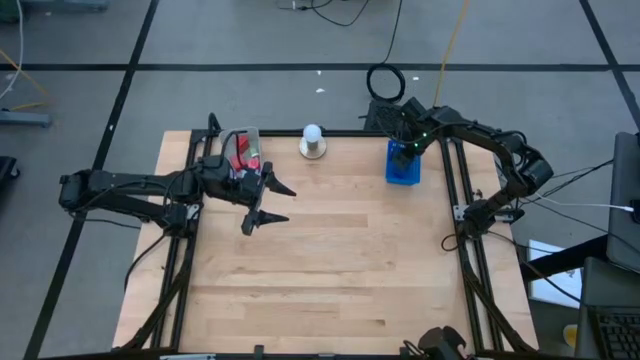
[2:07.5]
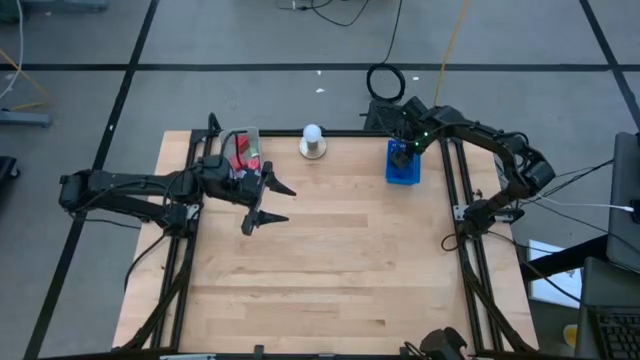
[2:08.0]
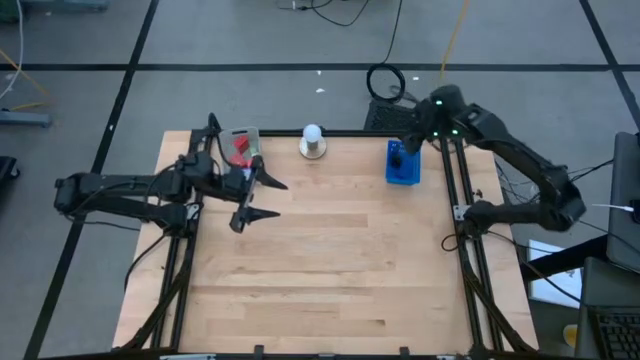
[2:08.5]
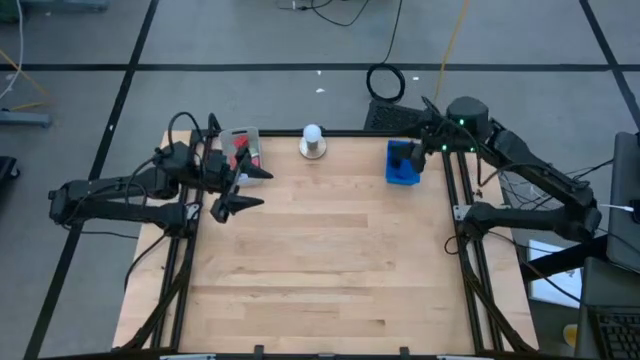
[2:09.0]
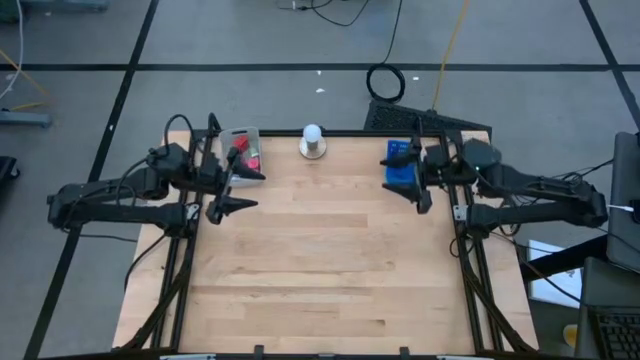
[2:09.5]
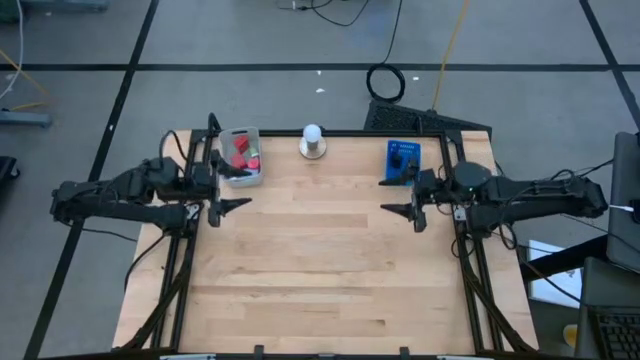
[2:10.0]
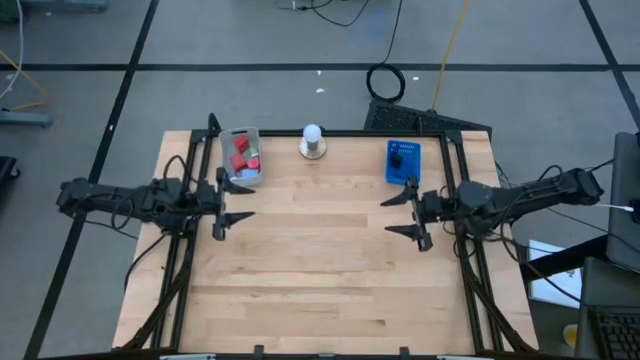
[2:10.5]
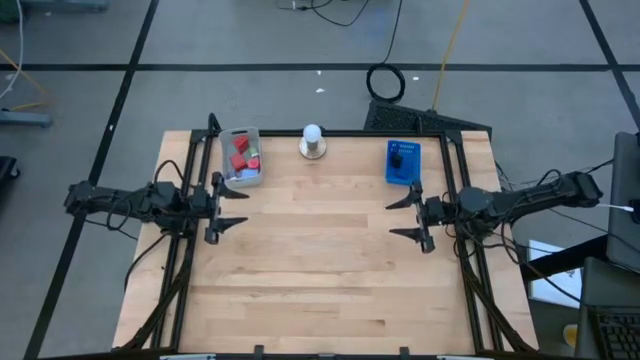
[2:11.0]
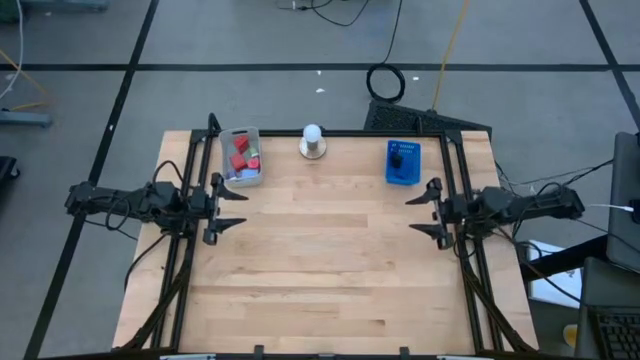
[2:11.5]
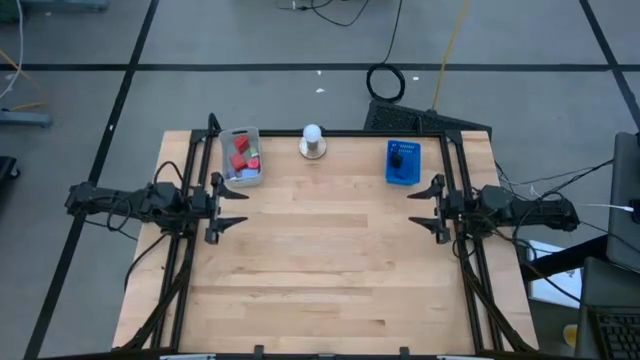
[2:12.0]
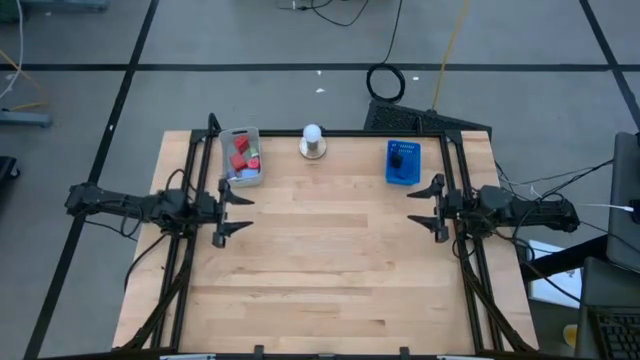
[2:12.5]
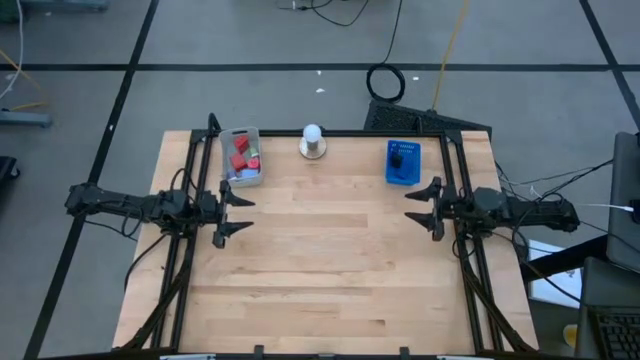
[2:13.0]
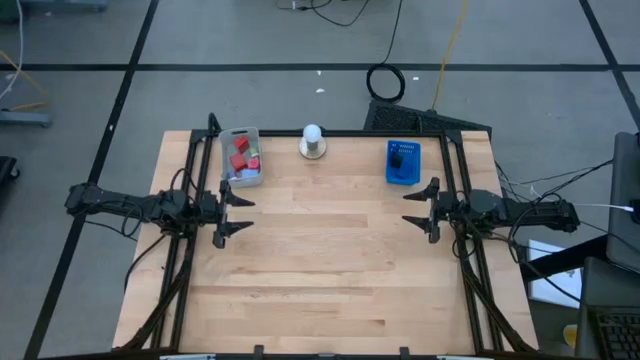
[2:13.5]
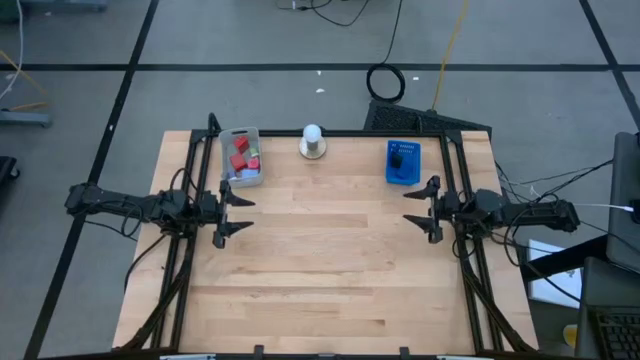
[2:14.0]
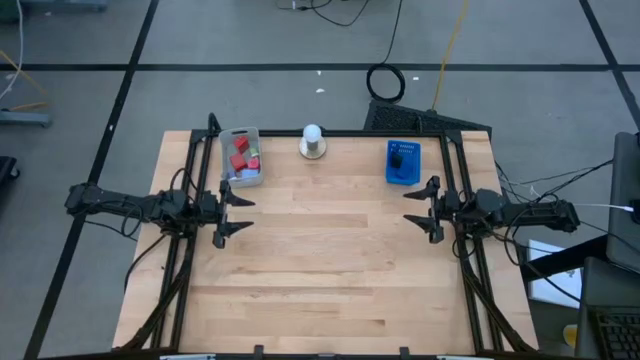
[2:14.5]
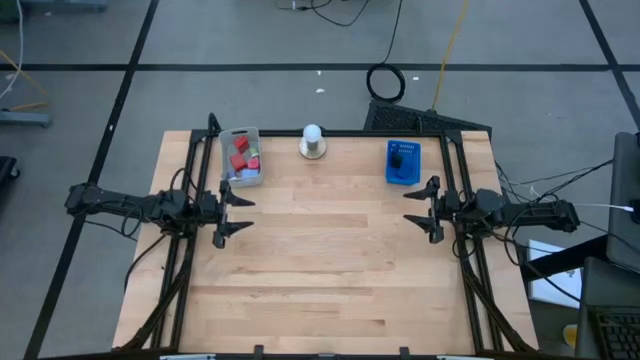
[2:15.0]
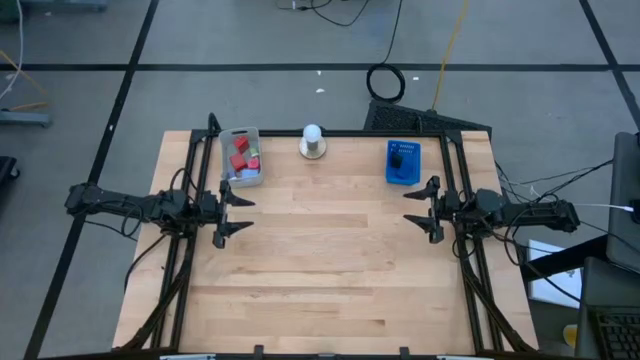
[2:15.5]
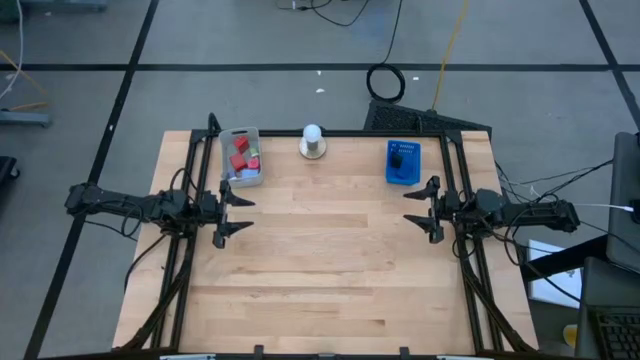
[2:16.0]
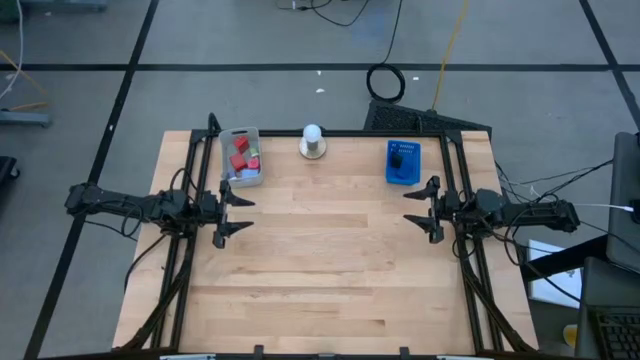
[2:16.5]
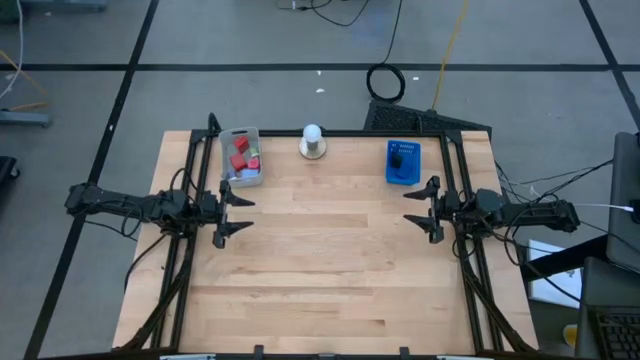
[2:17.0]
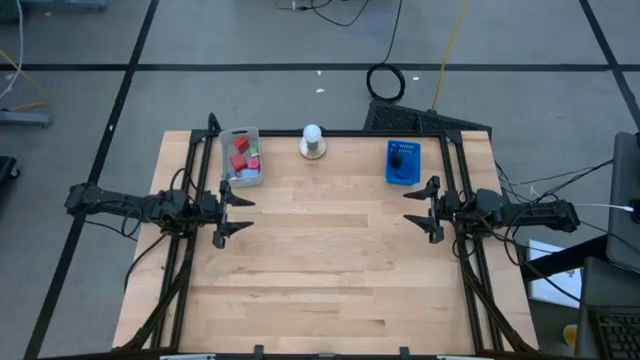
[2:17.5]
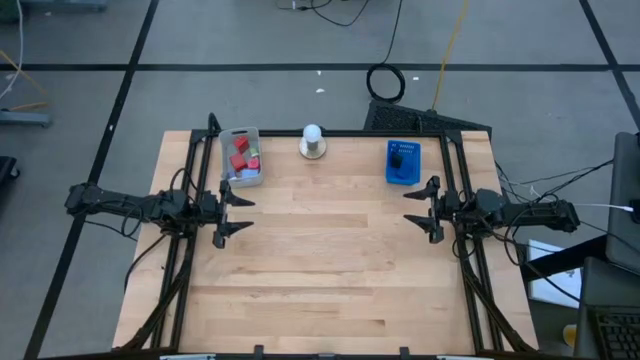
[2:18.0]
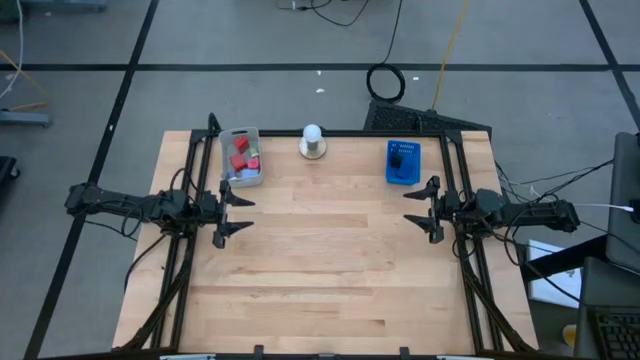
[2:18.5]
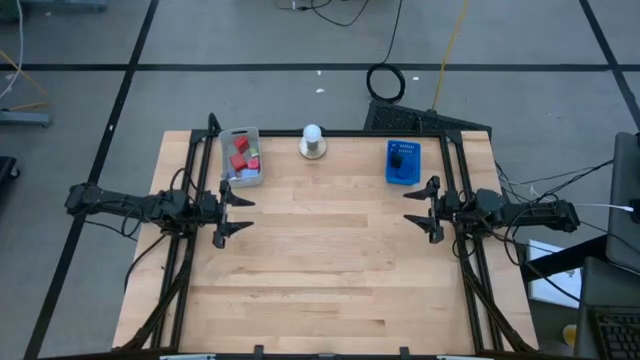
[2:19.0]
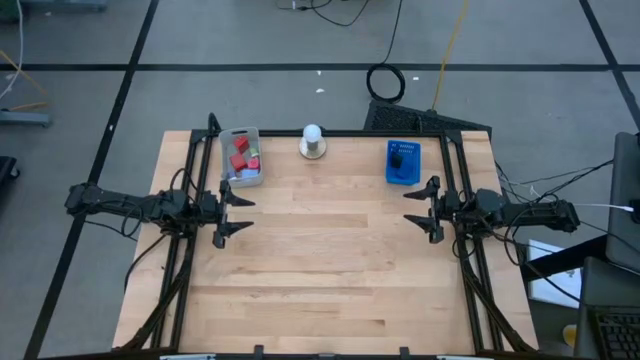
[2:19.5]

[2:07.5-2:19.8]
Task: Pick & Place Office items
Return to Home Position

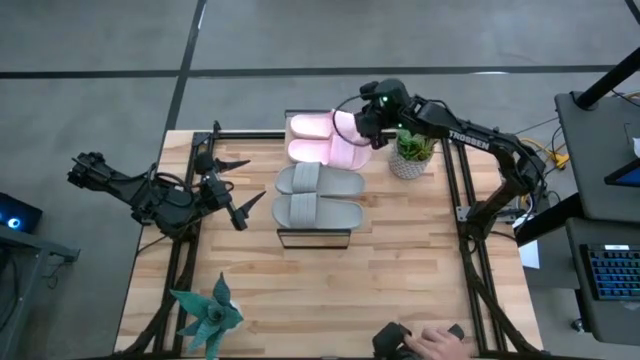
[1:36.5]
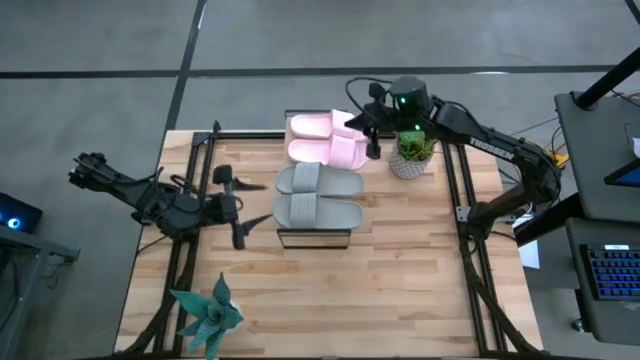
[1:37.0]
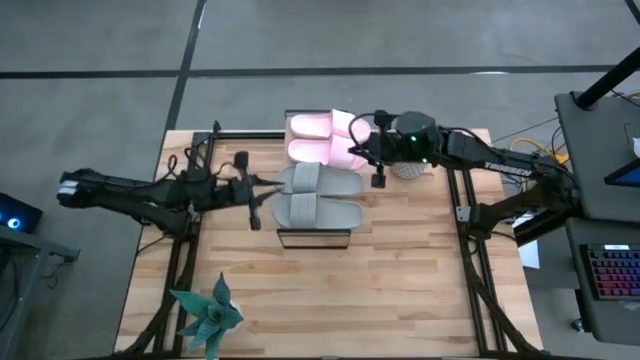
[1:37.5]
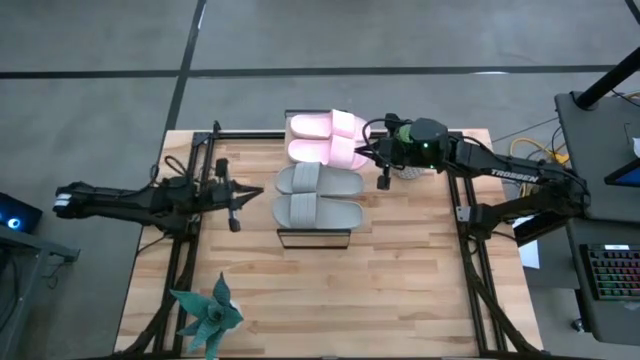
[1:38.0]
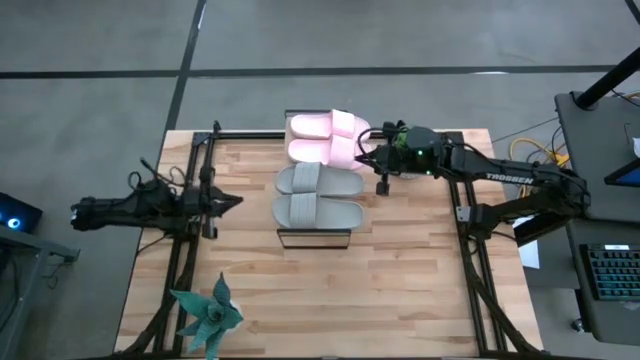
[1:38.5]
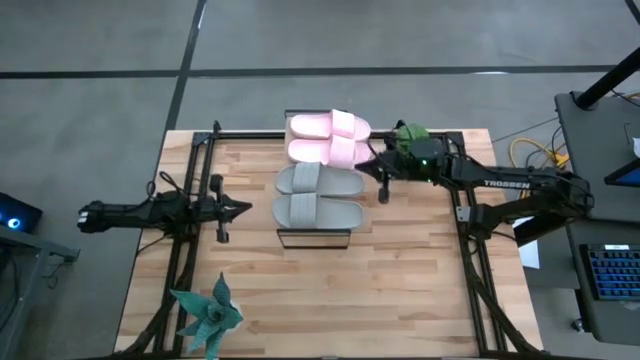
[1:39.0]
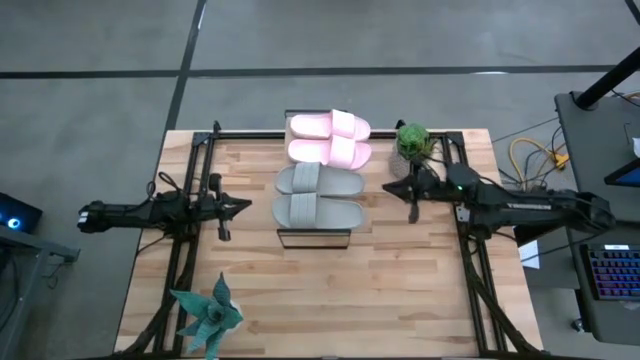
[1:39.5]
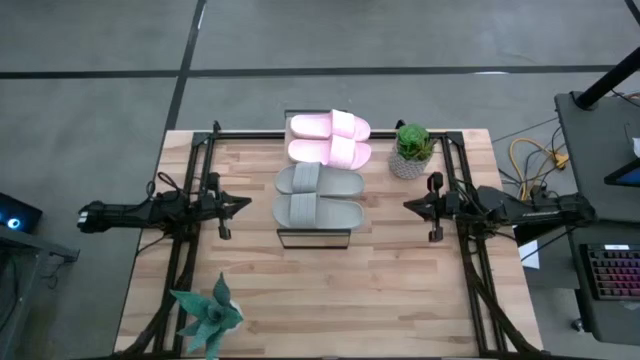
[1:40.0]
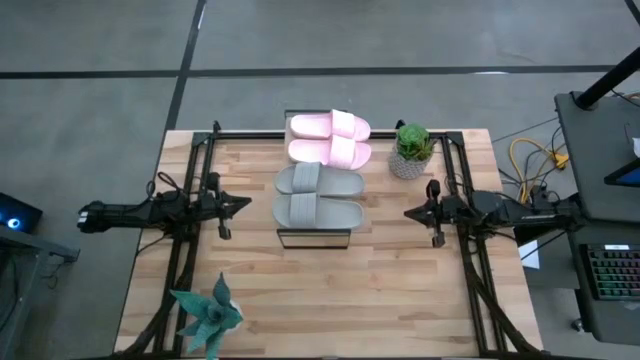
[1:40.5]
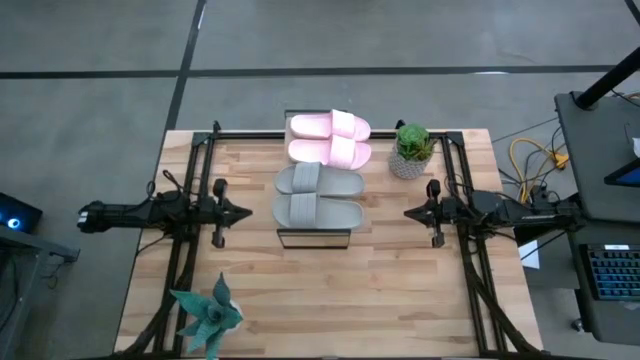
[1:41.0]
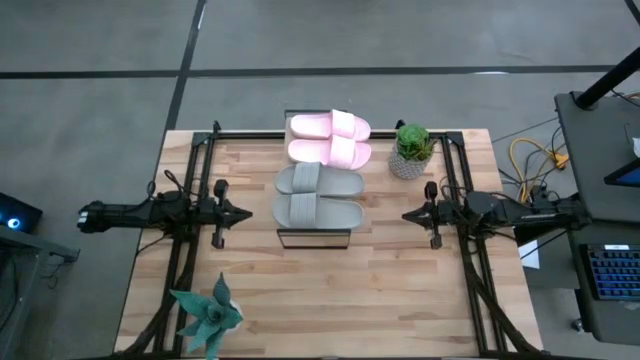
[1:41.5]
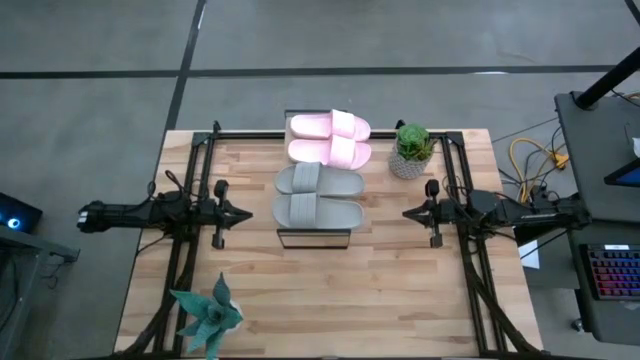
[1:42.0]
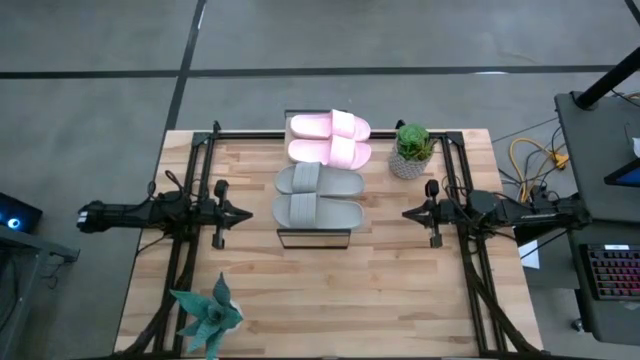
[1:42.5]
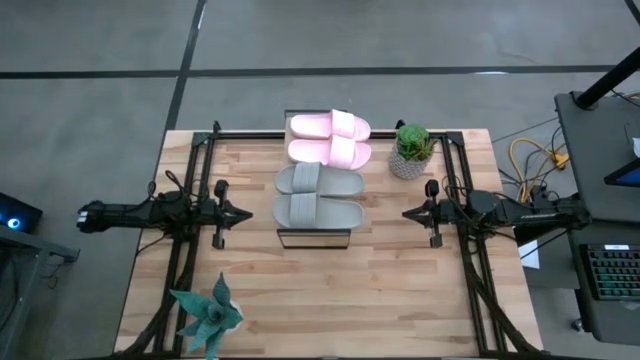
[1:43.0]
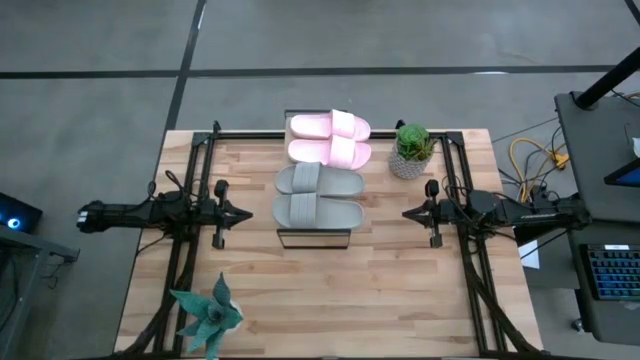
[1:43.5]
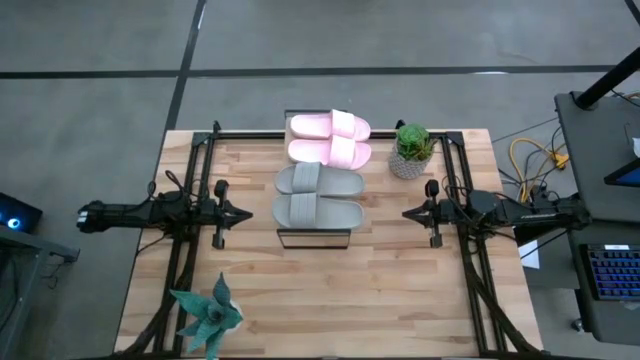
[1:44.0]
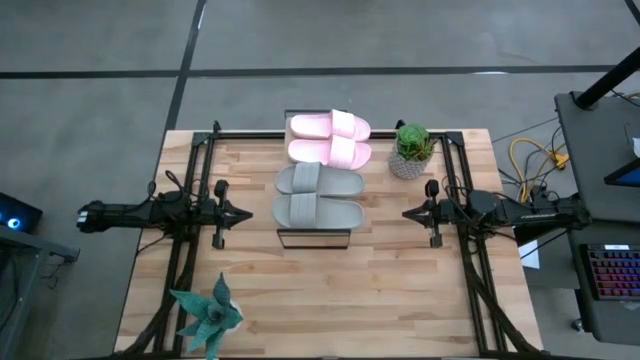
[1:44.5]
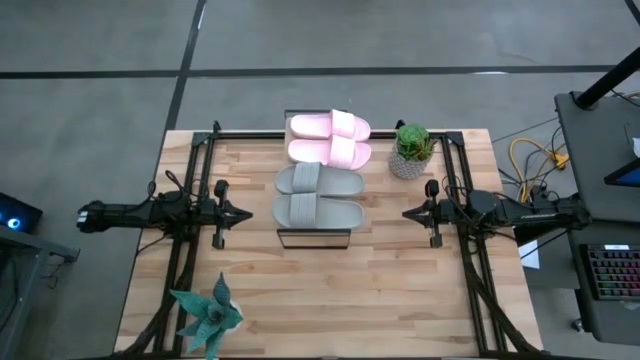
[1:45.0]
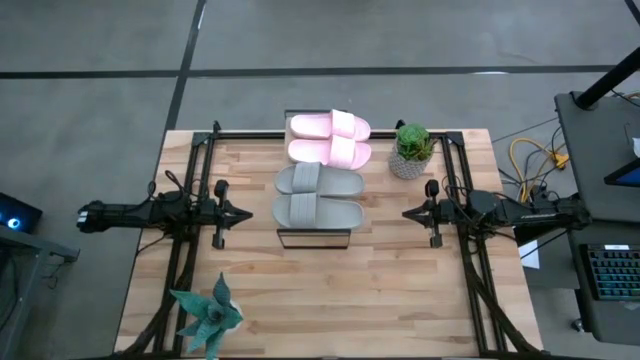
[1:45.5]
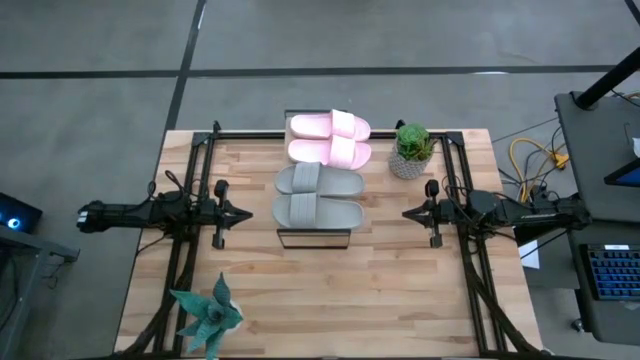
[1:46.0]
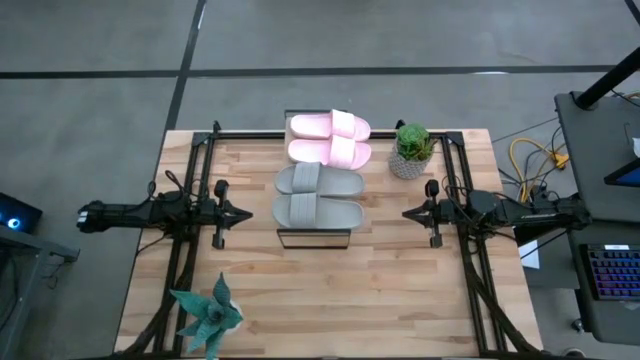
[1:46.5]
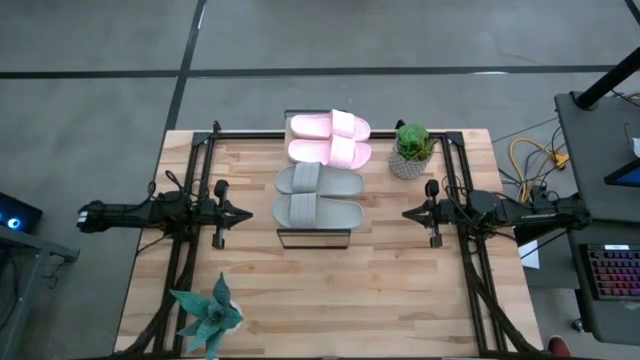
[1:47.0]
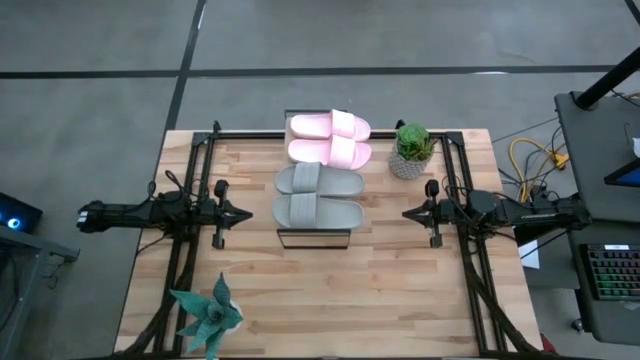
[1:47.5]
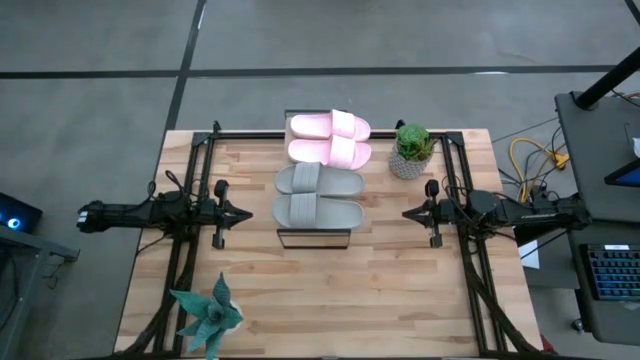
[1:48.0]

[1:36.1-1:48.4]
Task: Pick and place slides into the shelf
Return to Home Position
